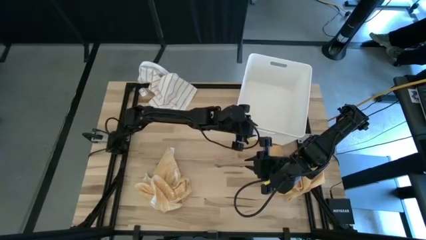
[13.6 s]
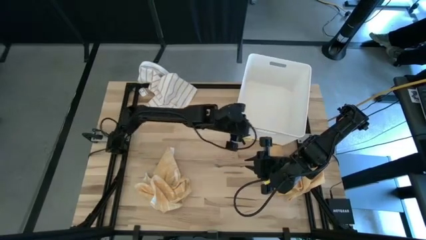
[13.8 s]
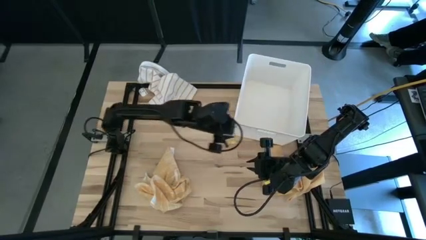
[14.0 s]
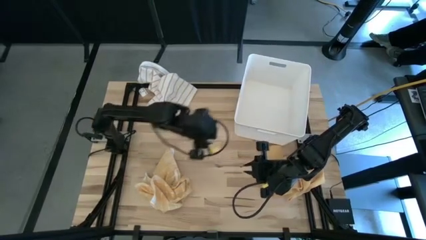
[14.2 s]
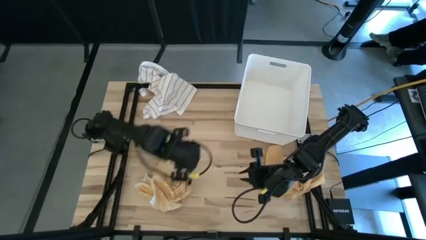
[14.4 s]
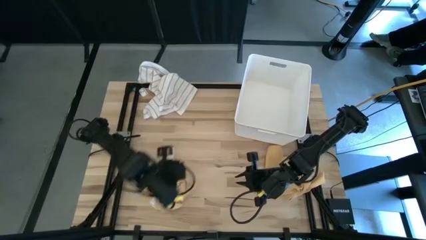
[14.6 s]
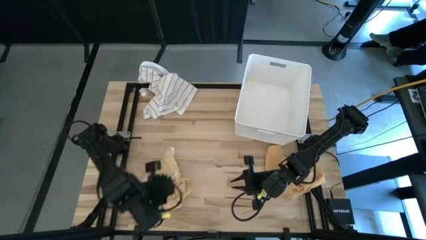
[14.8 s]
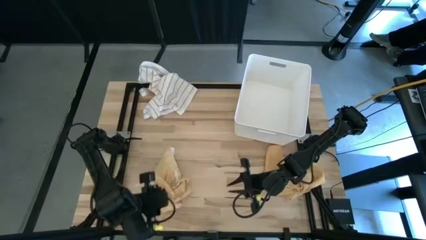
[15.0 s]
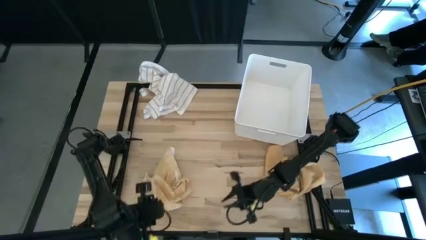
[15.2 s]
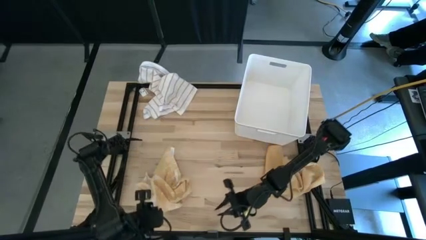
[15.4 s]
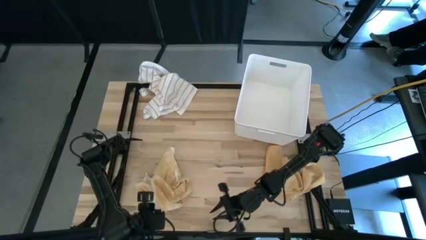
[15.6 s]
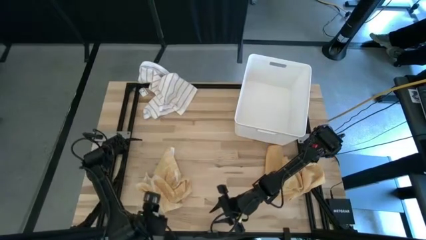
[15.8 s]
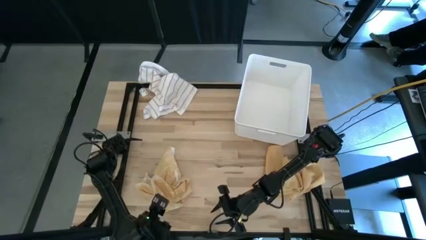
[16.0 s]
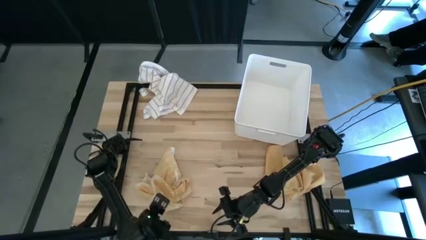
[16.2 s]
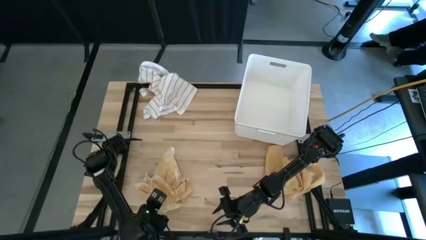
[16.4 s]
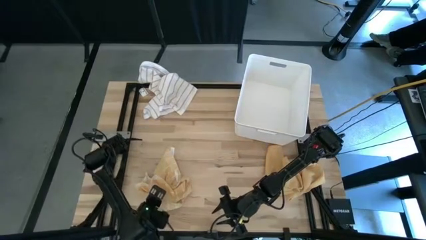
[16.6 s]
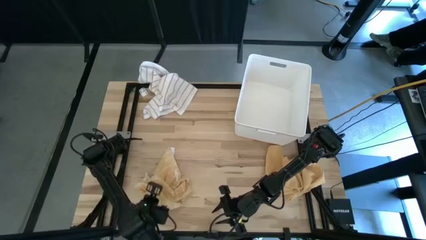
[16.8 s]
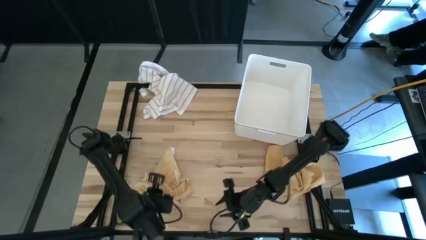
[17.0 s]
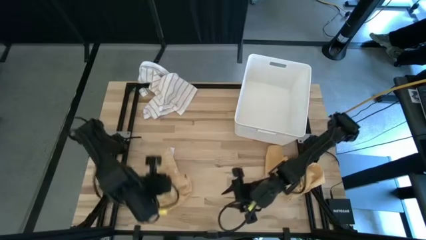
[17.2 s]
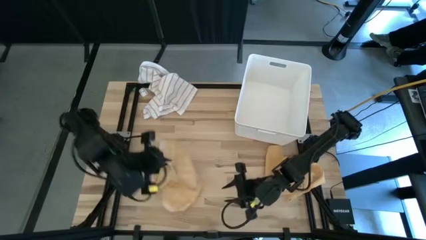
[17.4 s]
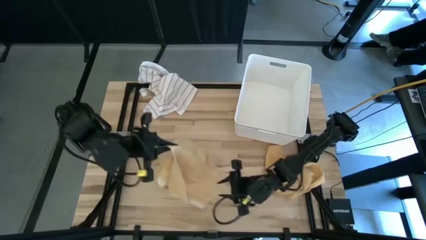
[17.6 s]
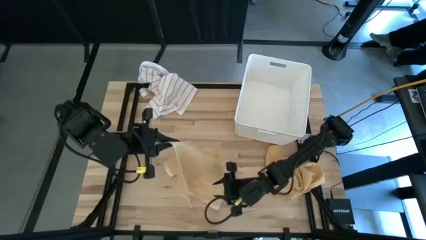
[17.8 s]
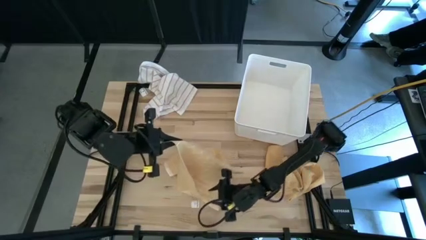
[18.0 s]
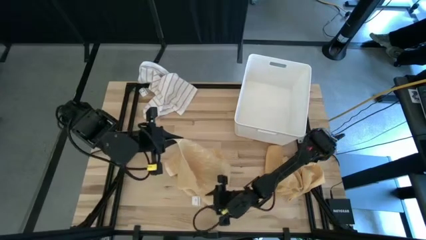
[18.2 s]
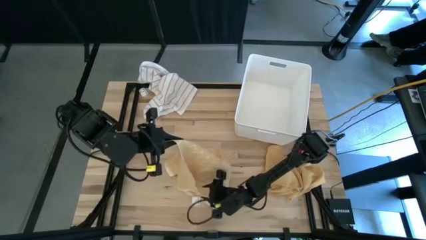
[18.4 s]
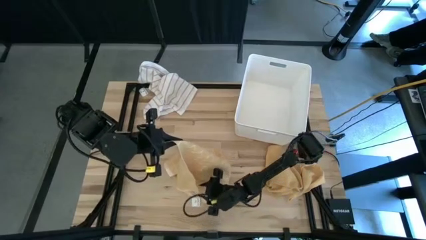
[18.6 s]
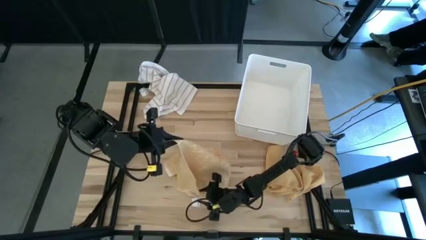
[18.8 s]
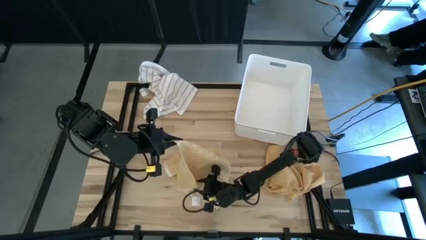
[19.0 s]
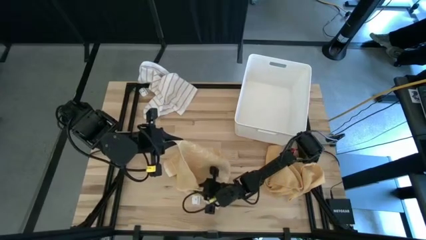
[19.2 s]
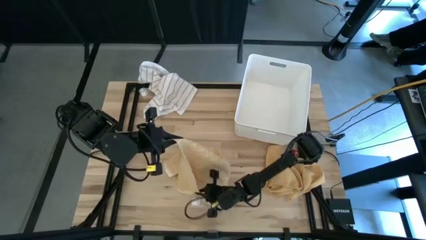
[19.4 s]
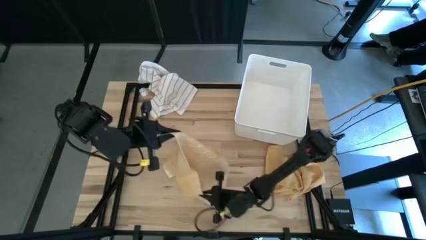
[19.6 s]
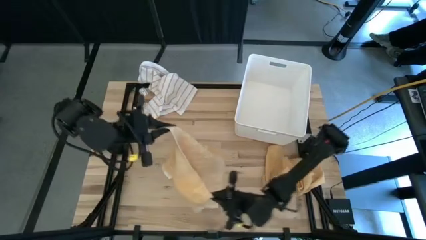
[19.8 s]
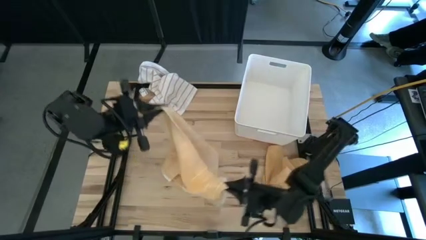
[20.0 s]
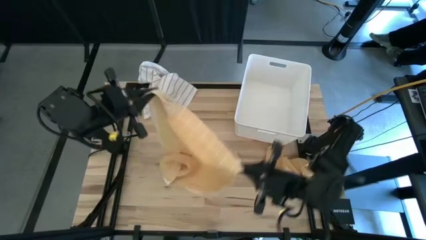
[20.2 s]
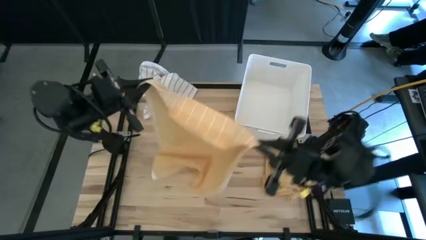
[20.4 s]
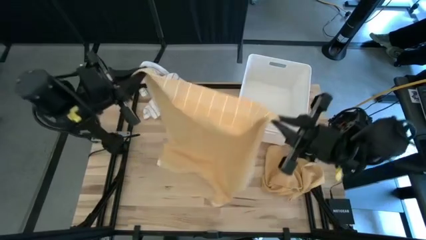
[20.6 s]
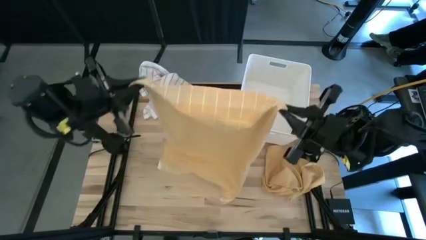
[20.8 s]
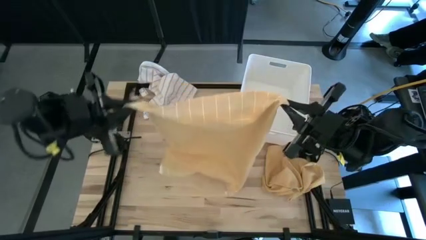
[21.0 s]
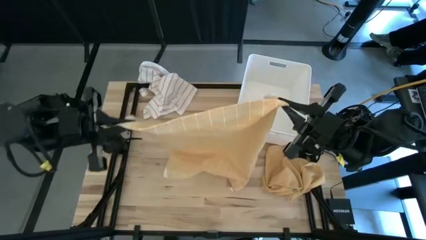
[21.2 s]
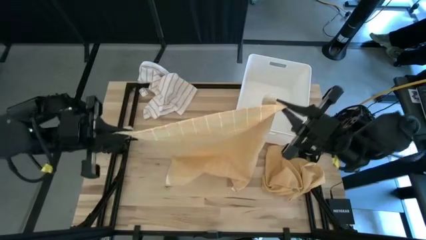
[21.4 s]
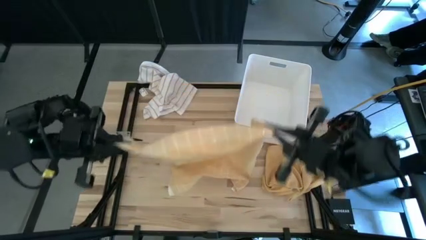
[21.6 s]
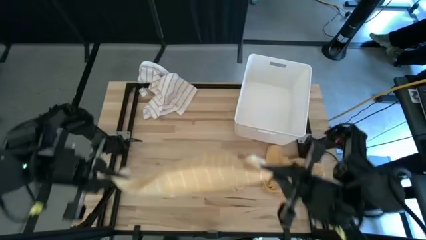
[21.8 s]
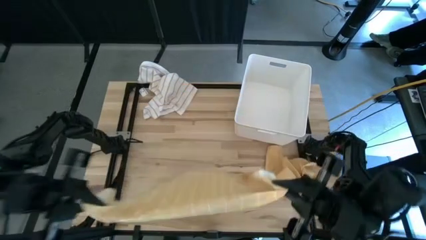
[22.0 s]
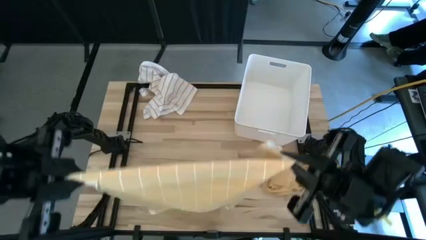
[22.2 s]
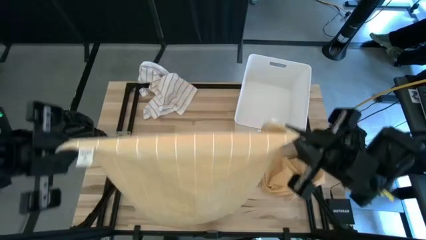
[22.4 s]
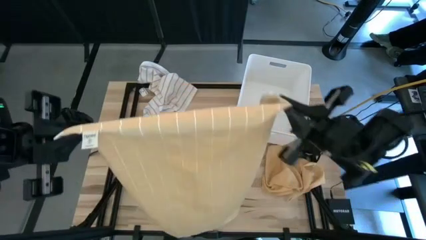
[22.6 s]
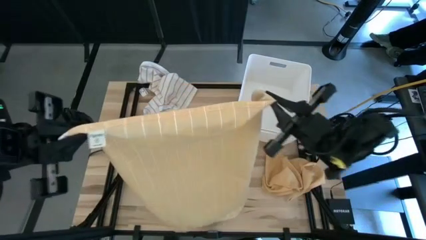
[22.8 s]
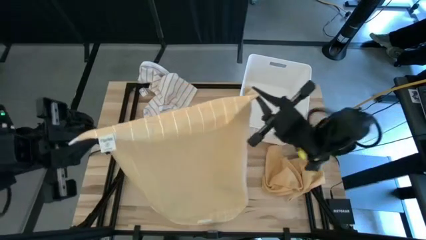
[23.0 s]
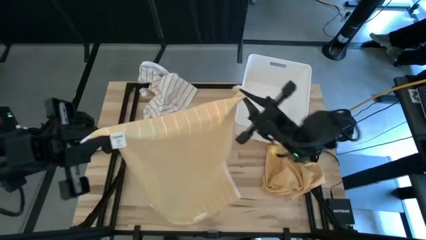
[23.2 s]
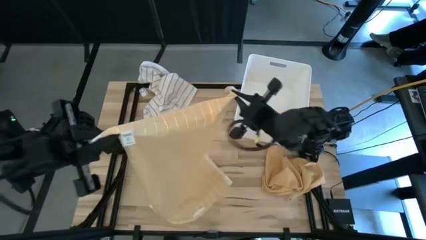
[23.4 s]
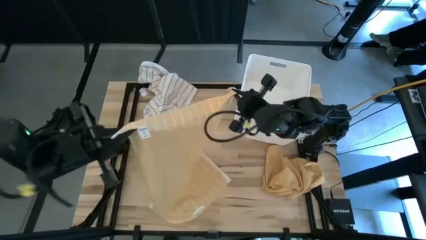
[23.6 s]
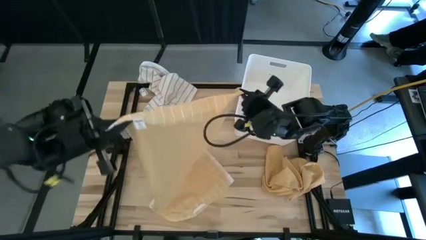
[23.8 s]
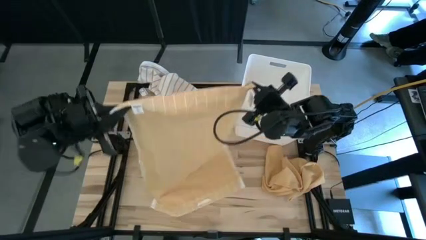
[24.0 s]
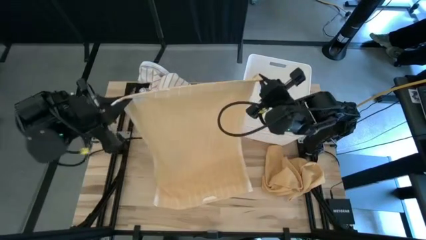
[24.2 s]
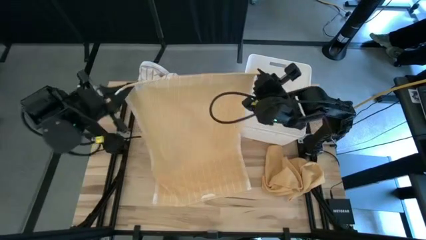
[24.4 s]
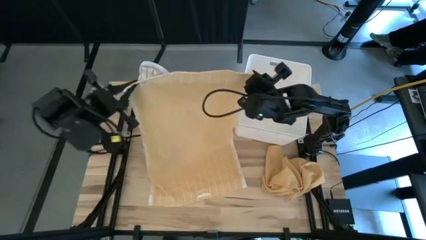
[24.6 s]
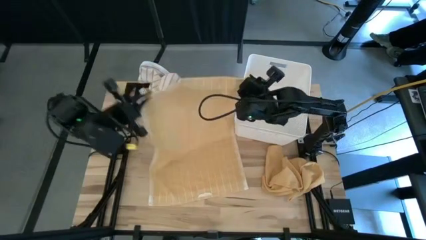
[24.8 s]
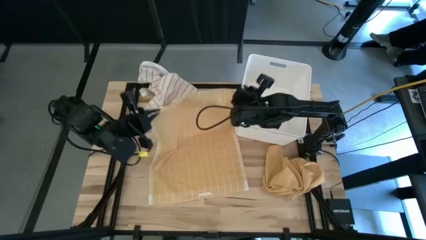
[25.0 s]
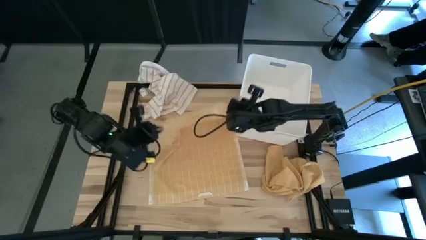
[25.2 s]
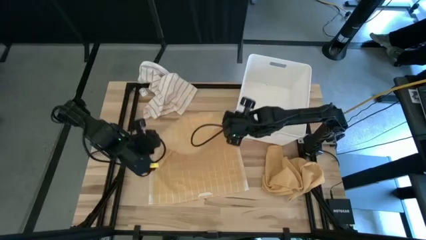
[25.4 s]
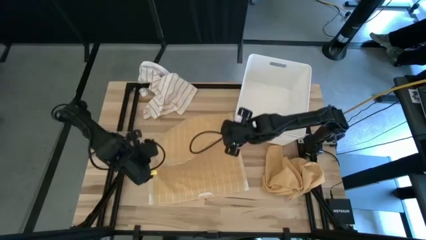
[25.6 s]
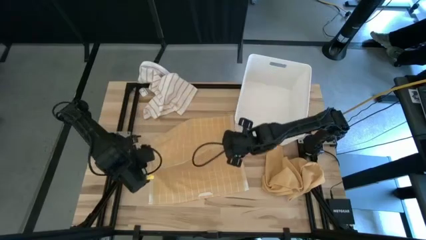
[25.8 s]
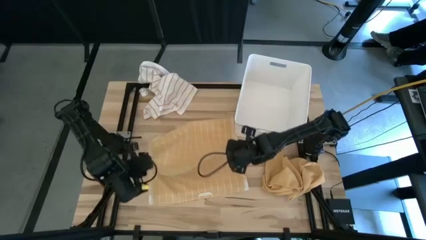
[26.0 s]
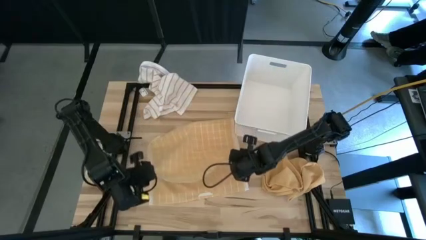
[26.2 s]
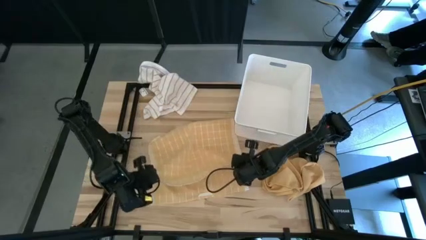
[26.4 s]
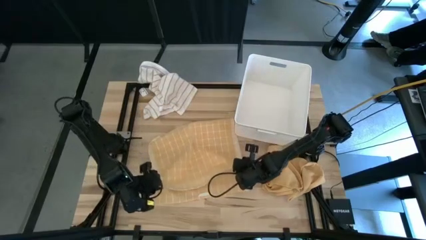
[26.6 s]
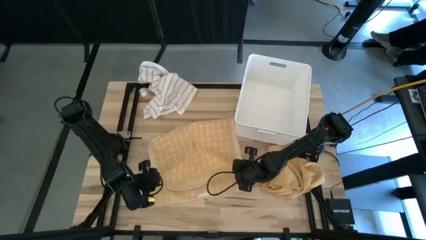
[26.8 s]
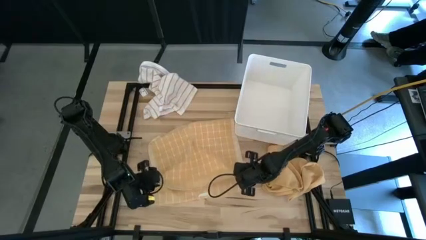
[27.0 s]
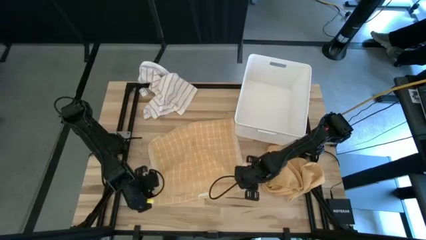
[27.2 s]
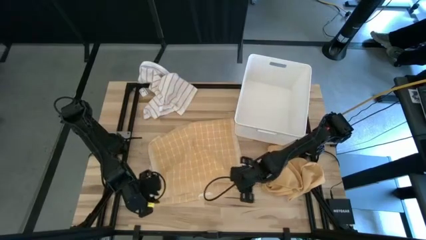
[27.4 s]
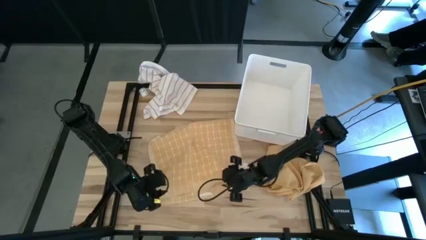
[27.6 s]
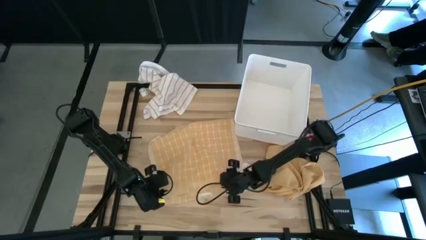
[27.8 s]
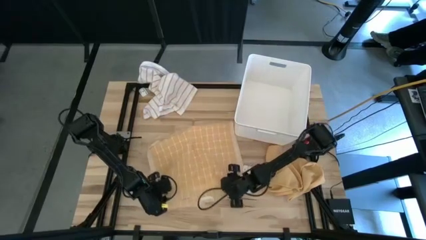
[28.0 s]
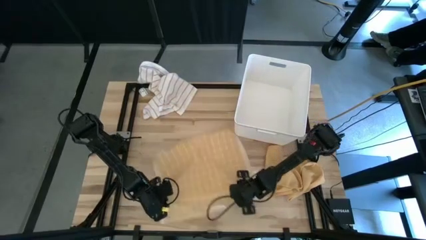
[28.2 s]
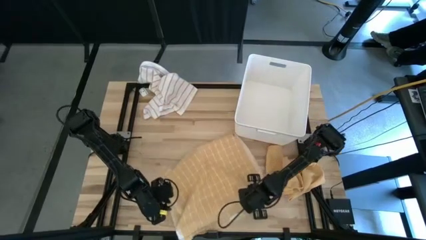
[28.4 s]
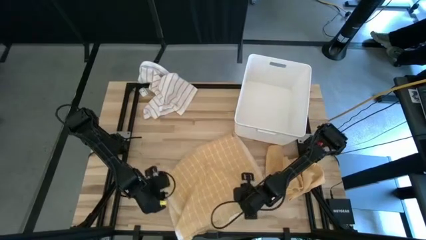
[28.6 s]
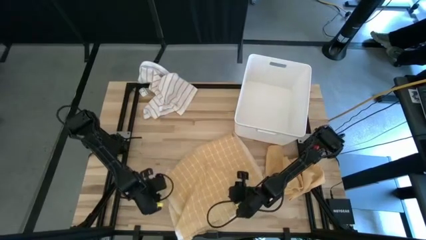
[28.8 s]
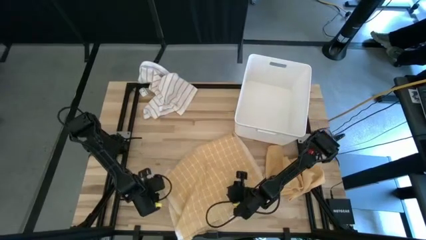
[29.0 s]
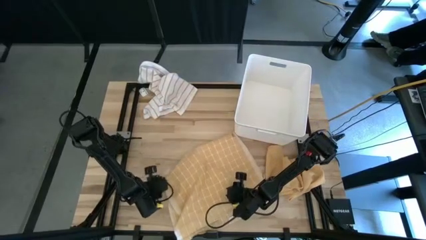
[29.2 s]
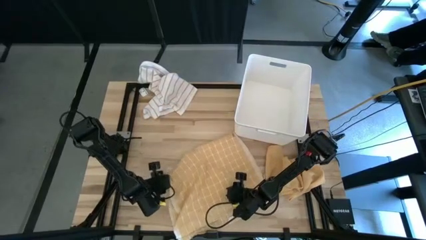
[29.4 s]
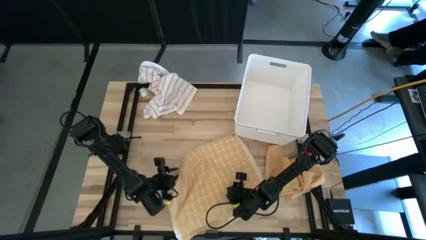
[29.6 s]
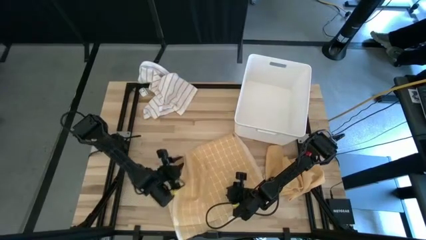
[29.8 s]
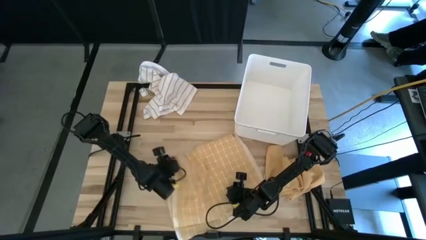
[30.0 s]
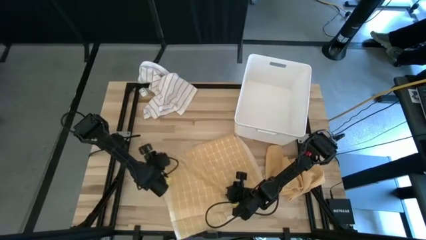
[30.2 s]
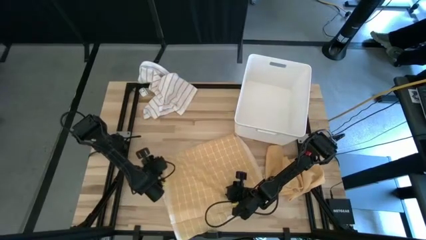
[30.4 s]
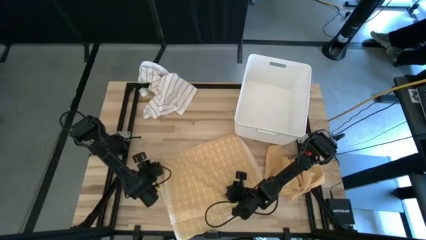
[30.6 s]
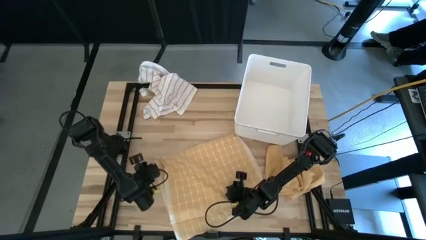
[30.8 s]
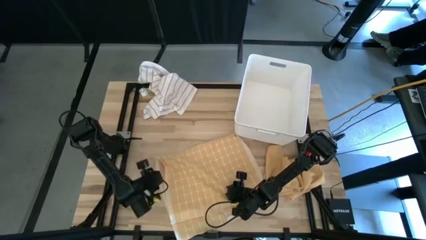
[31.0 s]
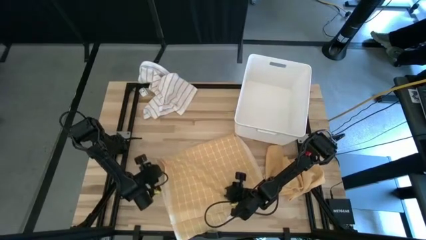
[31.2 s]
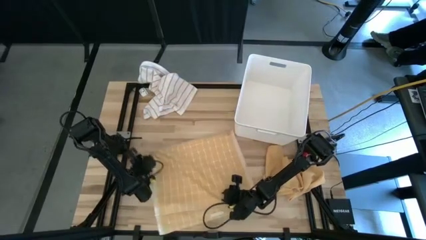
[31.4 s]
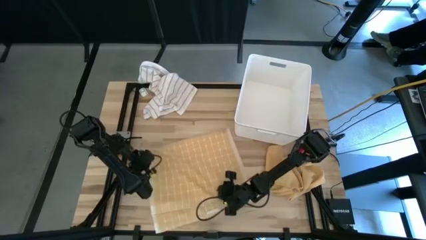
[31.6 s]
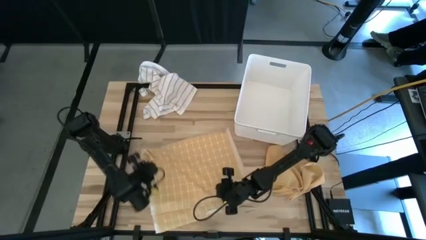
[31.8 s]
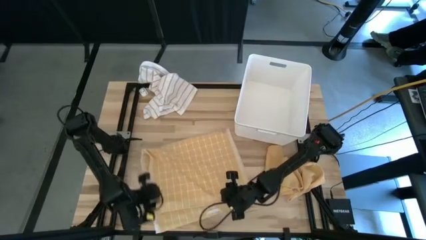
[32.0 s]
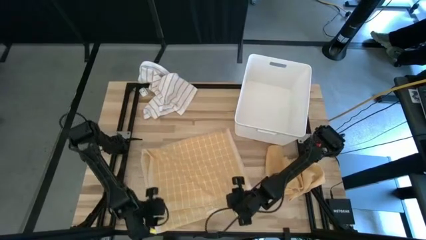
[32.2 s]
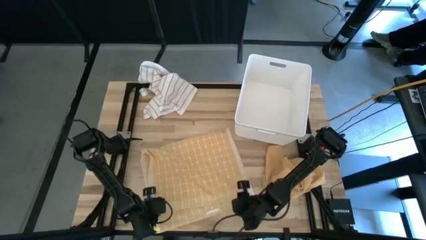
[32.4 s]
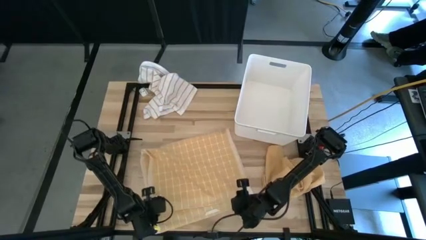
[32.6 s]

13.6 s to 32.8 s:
Task: Fold towel
Fold the yellow patterned towel
